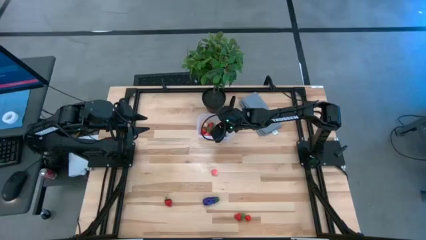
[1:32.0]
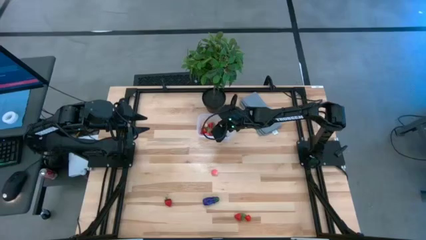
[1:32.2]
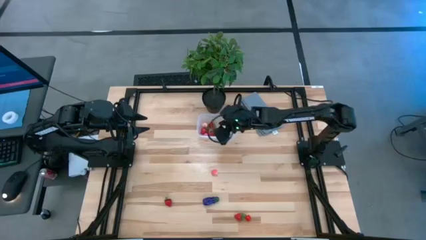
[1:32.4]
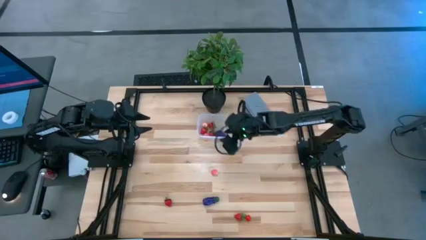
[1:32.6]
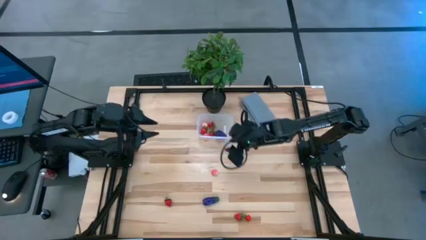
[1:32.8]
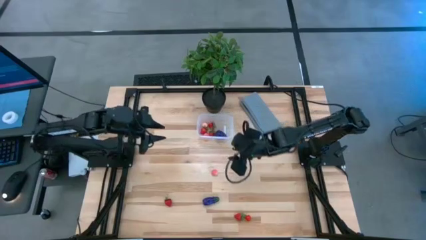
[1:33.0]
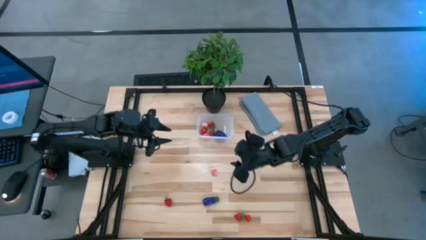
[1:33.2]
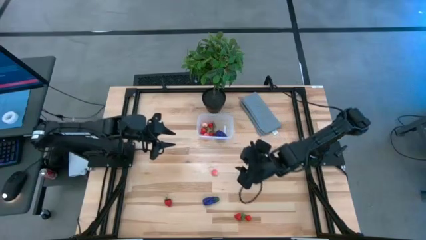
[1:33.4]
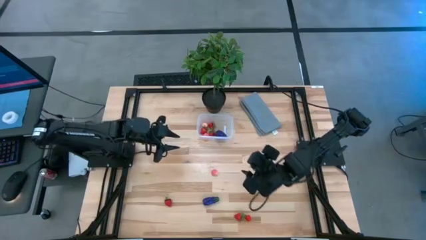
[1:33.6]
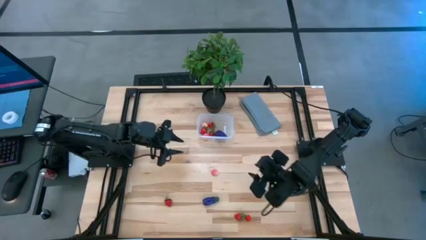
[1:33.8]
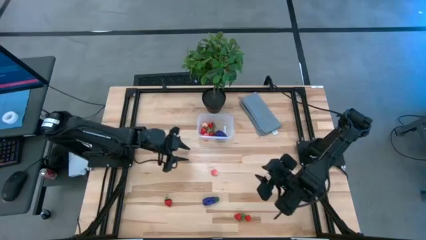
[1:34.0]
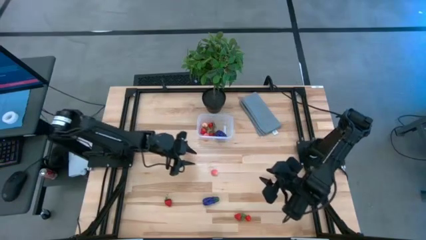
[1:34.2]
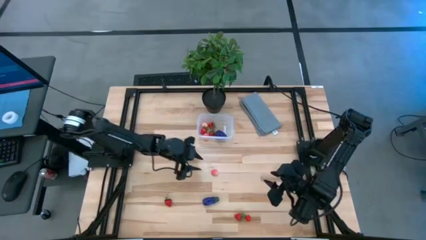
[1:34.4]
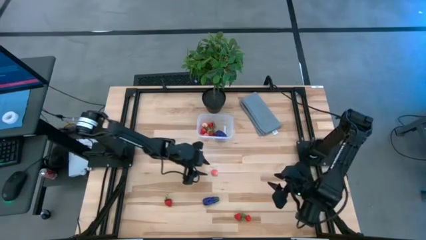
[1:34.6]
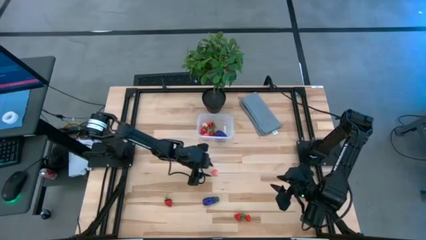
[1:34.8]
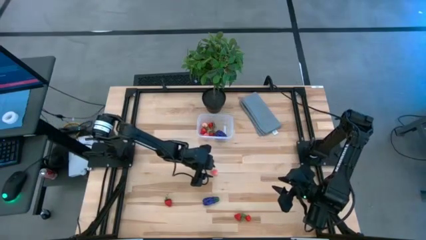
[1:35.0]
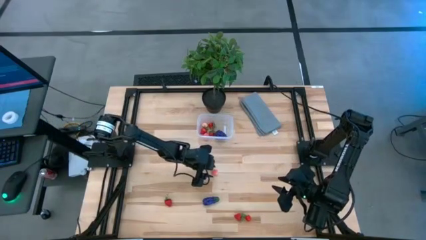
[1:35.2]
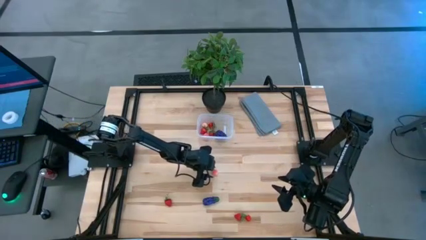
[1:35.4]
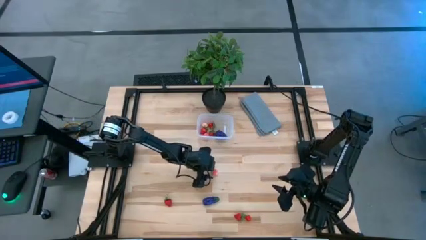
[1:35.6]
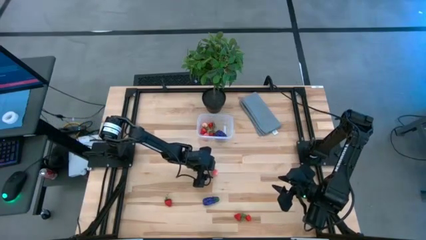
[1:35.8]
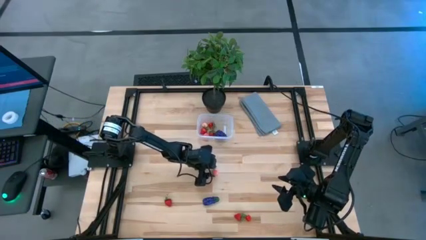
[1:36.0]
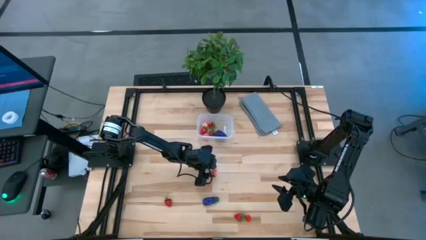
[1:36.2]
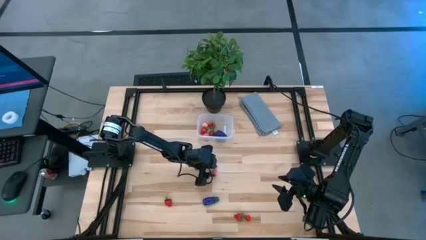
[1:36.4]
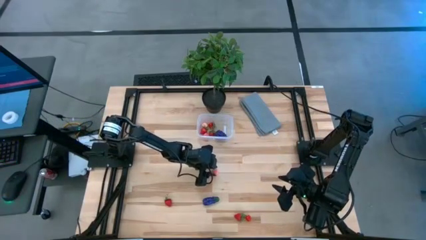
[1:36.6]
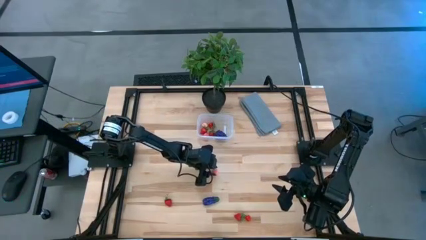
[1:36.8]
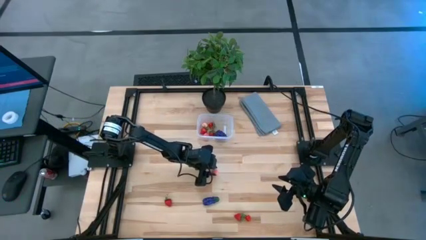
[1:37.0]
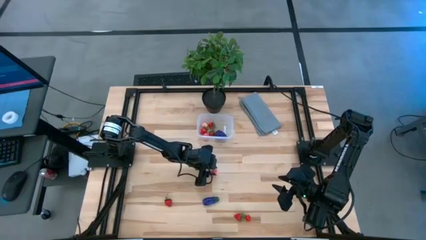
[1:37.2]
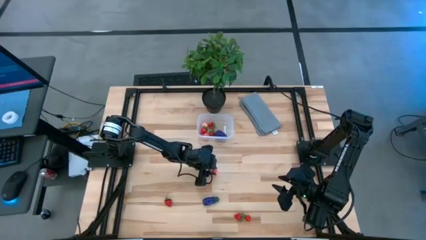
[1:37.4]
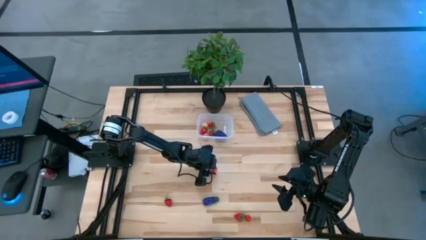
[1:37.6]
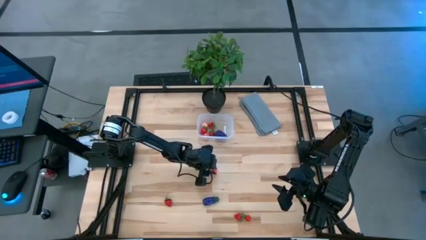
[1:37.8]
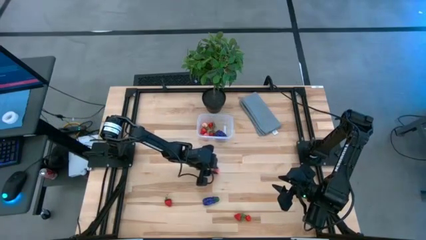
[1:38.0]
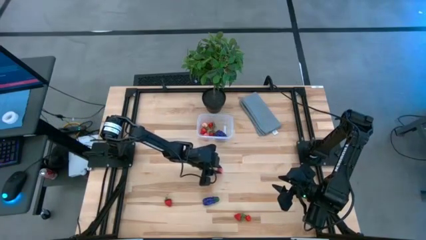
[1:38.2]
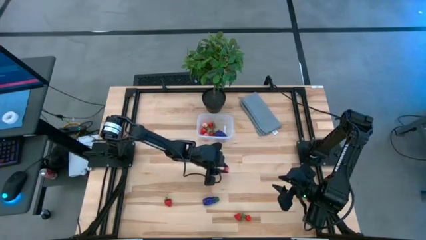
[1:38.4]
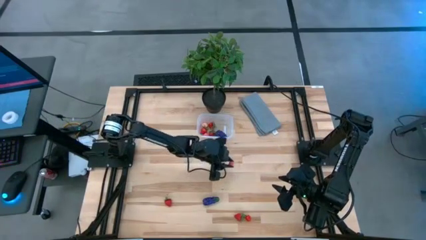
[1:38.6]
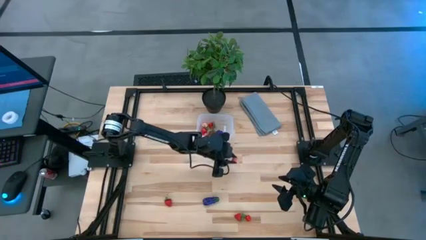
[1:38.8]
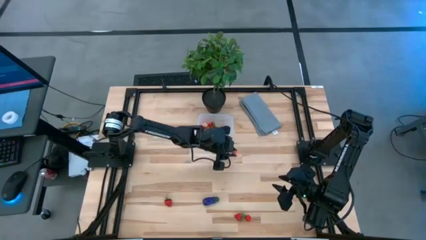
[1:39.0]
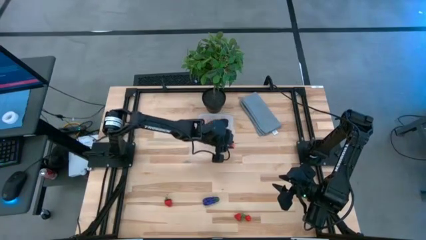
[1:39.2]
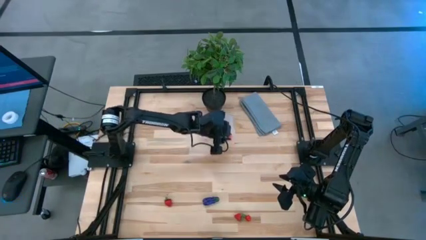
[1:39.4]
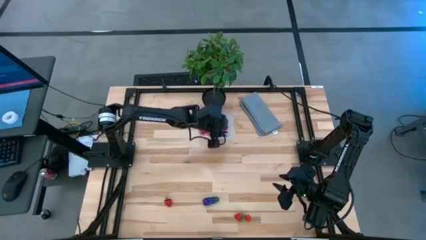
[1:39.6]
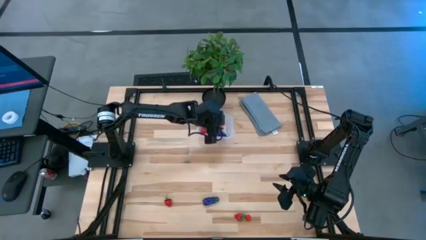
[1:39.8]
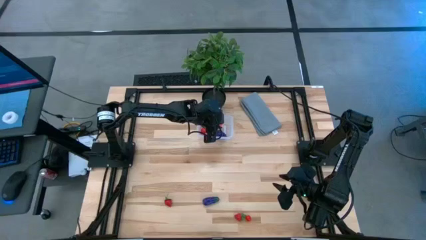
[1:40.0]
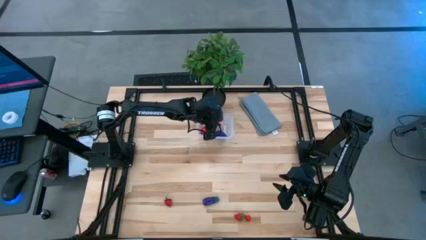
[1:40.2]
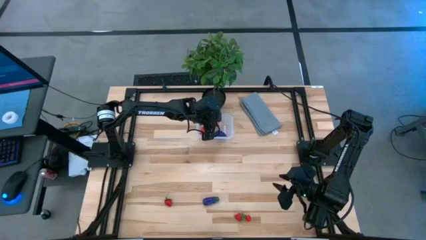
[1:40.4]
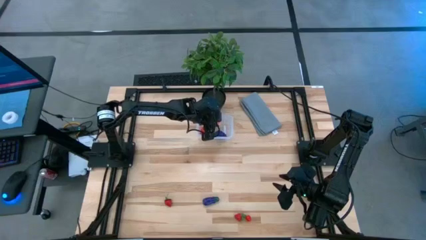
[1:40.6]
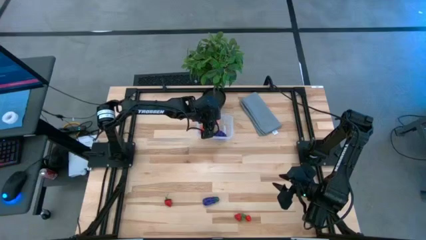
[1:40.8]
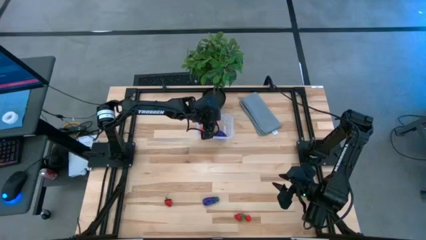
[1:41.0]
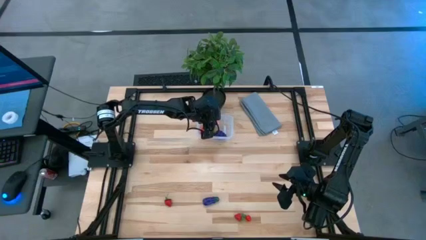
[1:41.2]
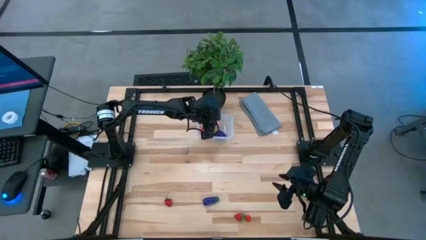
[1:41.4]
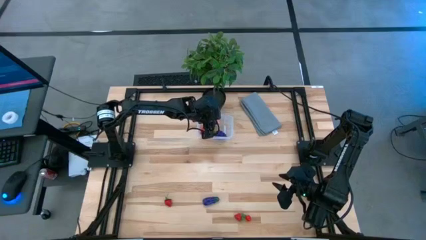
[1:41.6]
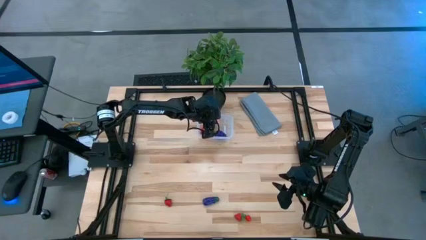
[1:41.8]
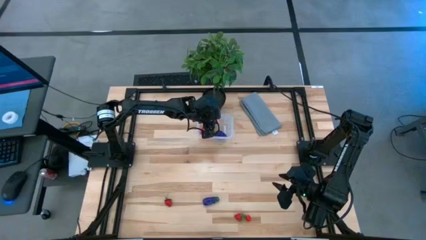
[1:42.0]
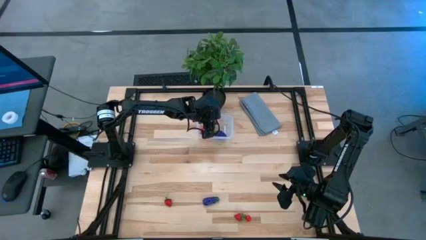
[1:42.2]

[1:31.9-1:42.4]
Task: Pick and placing Produce into tupperware
Put the pink peach into the transparent bin
